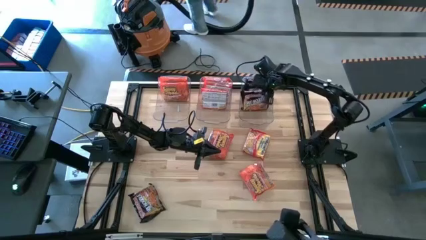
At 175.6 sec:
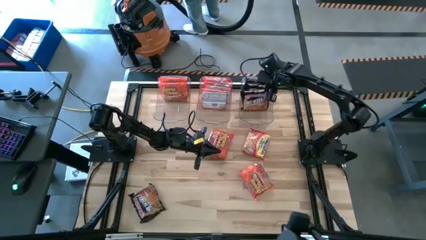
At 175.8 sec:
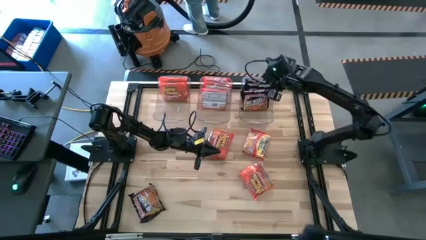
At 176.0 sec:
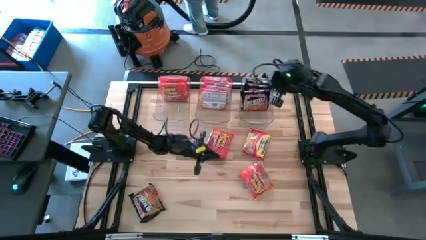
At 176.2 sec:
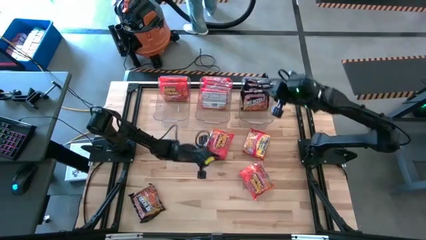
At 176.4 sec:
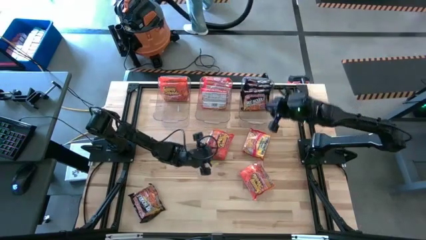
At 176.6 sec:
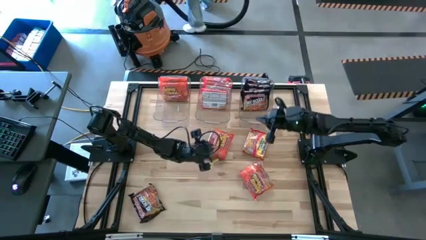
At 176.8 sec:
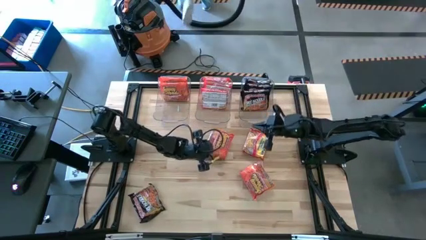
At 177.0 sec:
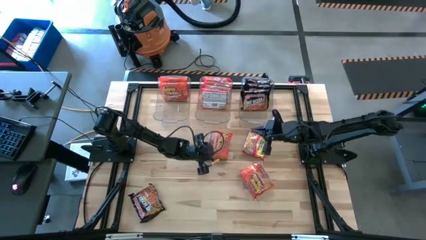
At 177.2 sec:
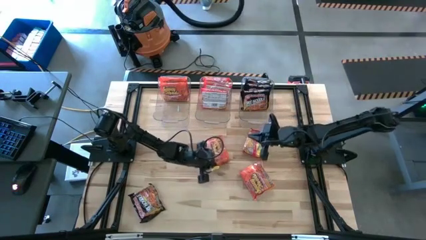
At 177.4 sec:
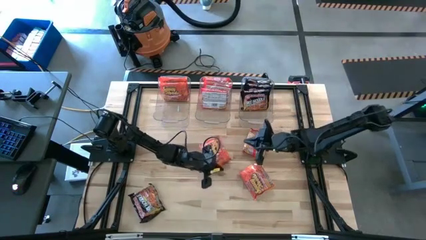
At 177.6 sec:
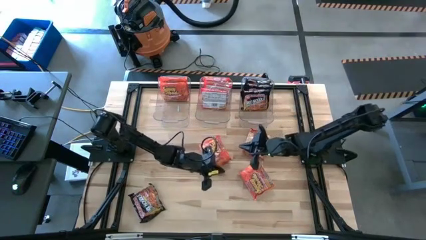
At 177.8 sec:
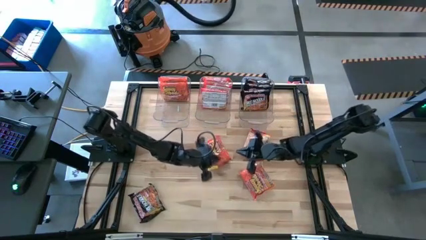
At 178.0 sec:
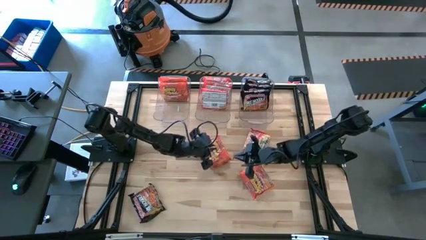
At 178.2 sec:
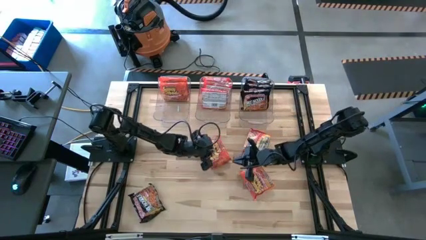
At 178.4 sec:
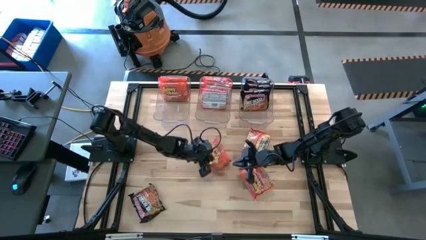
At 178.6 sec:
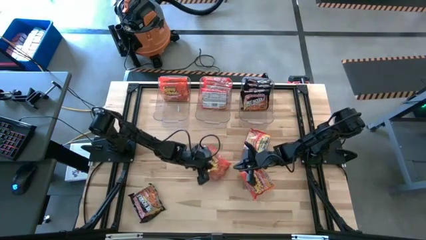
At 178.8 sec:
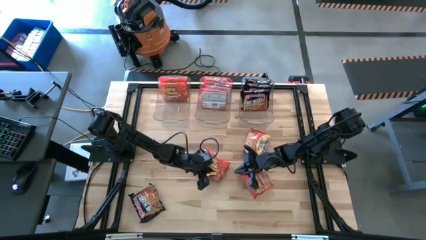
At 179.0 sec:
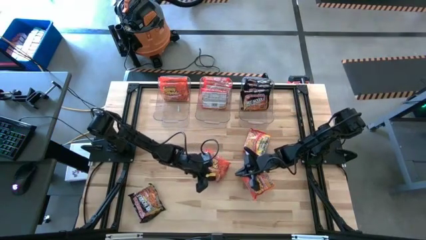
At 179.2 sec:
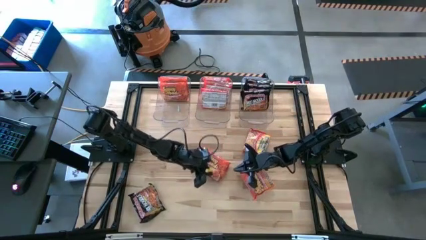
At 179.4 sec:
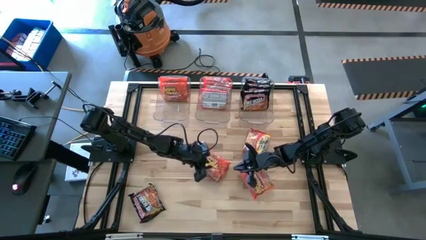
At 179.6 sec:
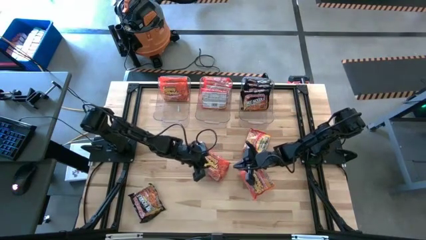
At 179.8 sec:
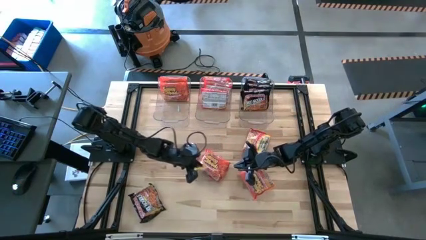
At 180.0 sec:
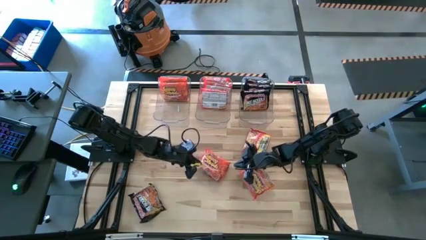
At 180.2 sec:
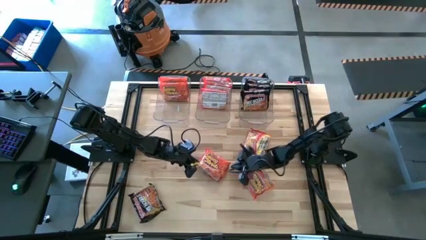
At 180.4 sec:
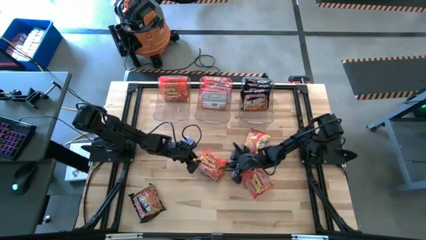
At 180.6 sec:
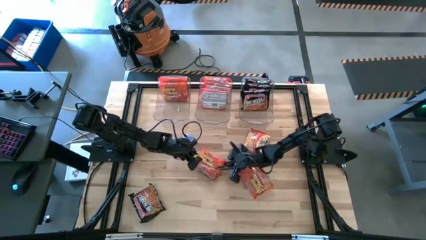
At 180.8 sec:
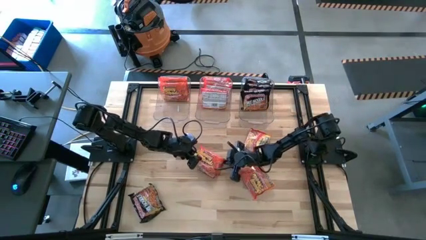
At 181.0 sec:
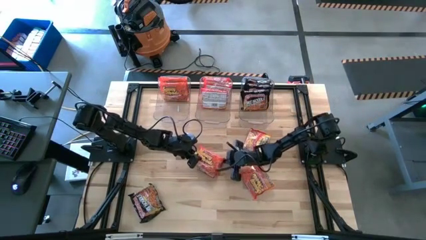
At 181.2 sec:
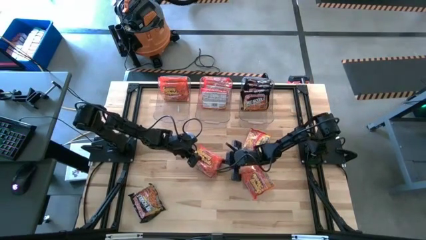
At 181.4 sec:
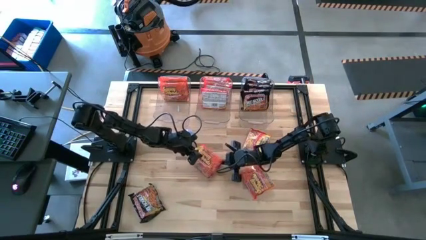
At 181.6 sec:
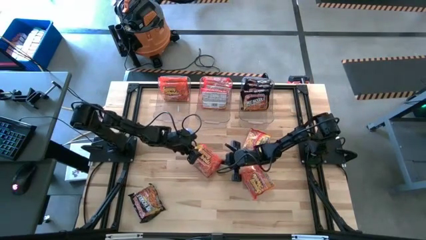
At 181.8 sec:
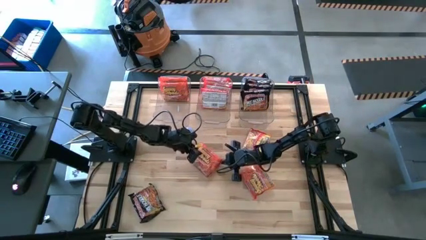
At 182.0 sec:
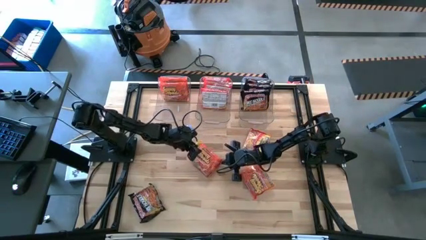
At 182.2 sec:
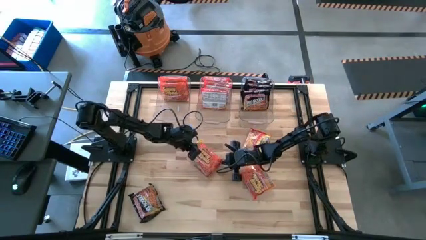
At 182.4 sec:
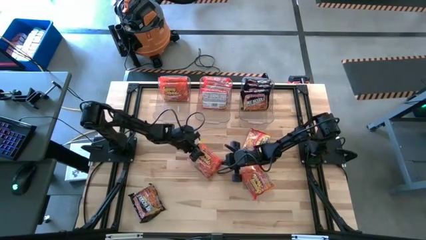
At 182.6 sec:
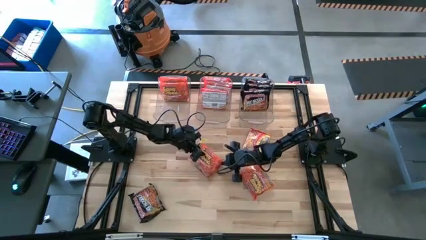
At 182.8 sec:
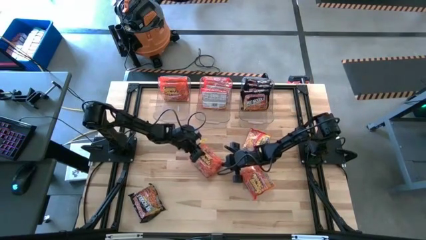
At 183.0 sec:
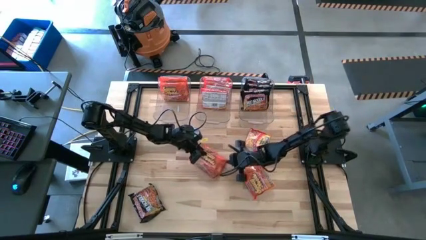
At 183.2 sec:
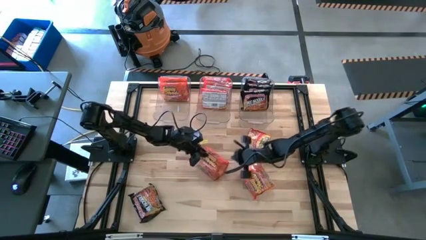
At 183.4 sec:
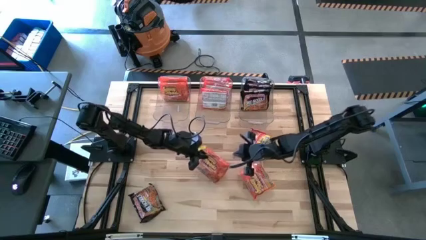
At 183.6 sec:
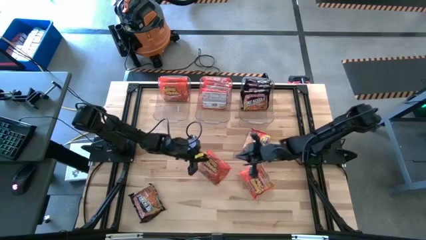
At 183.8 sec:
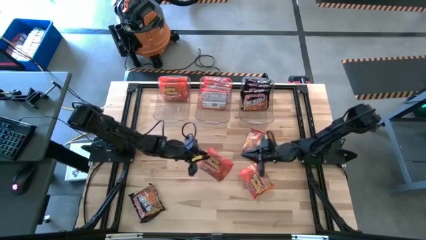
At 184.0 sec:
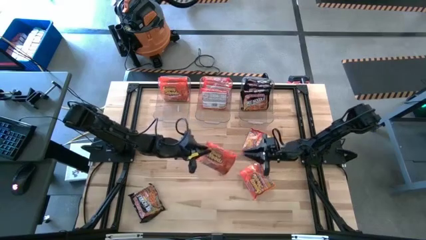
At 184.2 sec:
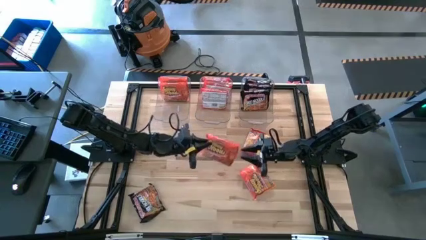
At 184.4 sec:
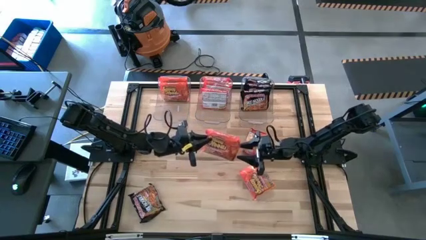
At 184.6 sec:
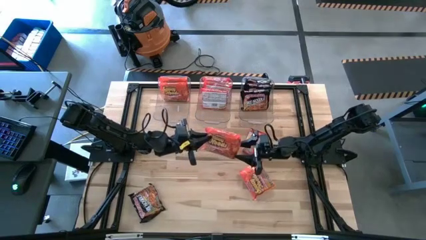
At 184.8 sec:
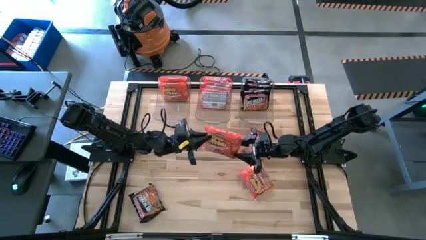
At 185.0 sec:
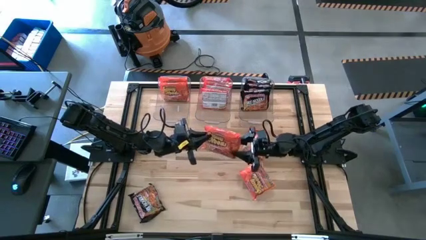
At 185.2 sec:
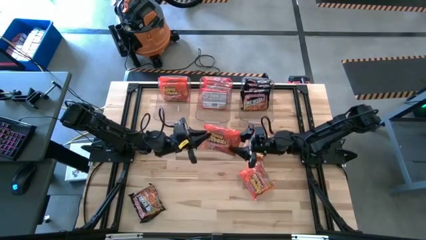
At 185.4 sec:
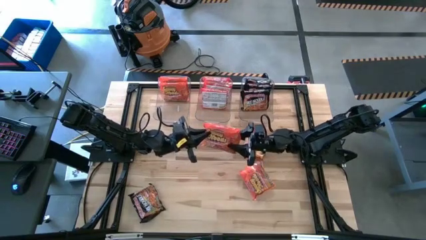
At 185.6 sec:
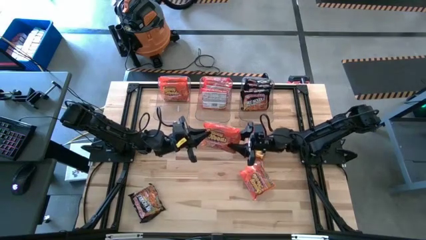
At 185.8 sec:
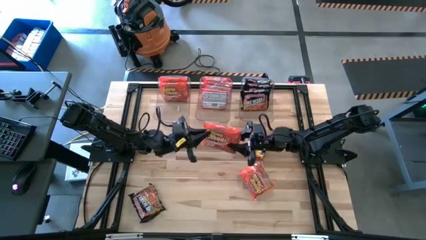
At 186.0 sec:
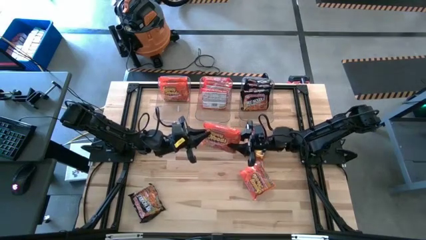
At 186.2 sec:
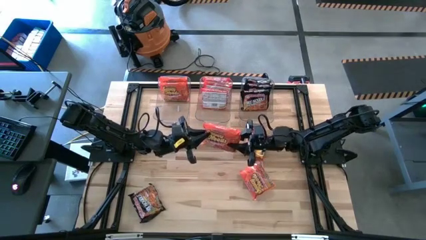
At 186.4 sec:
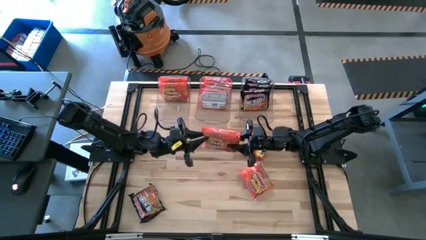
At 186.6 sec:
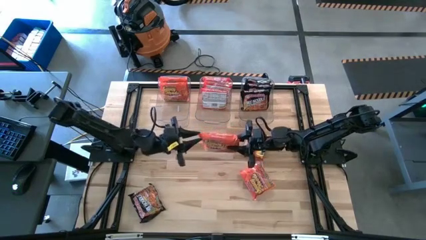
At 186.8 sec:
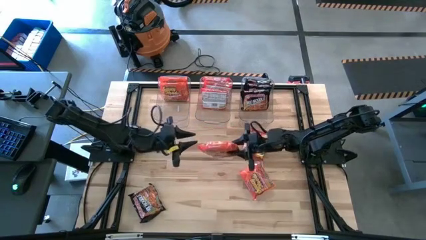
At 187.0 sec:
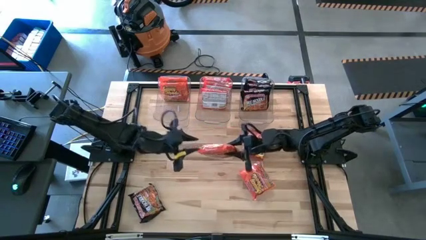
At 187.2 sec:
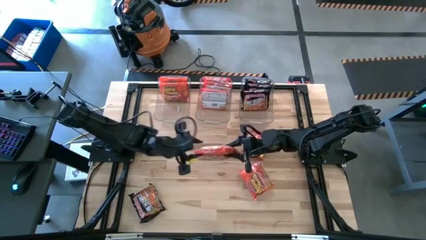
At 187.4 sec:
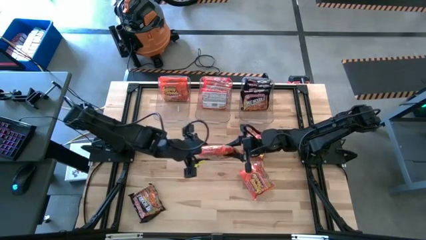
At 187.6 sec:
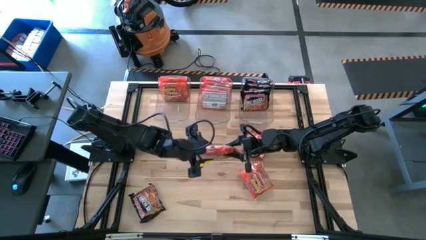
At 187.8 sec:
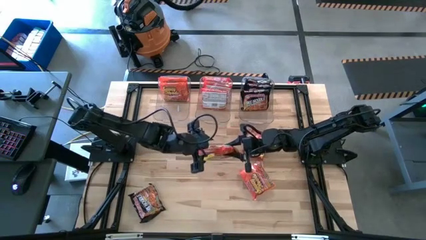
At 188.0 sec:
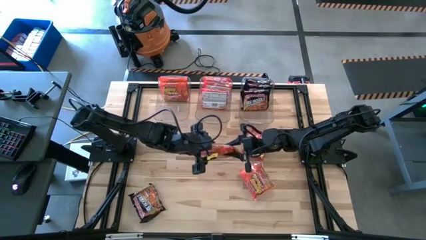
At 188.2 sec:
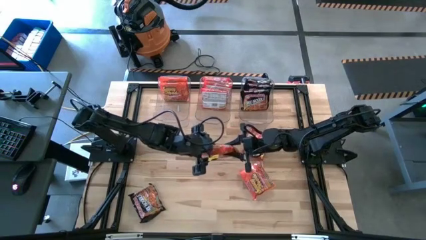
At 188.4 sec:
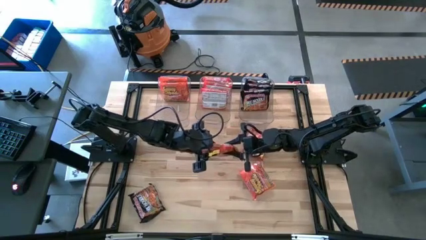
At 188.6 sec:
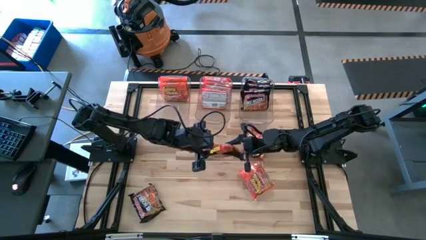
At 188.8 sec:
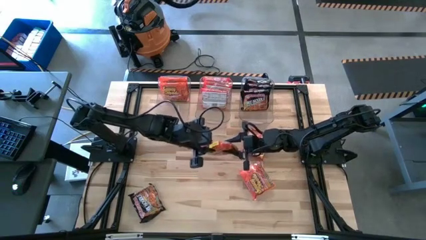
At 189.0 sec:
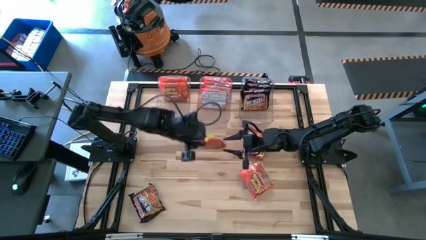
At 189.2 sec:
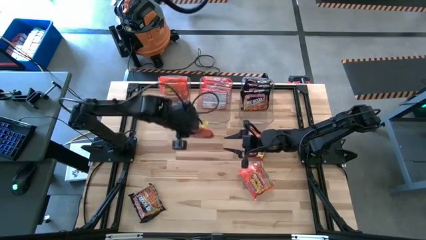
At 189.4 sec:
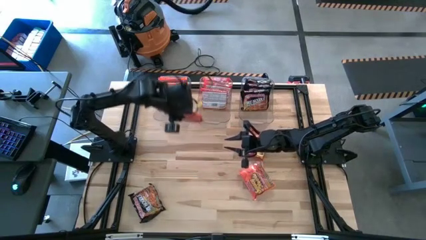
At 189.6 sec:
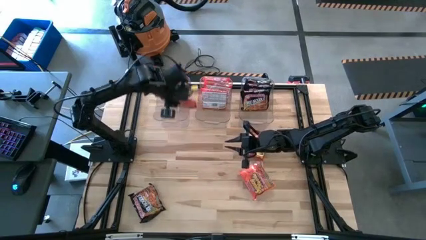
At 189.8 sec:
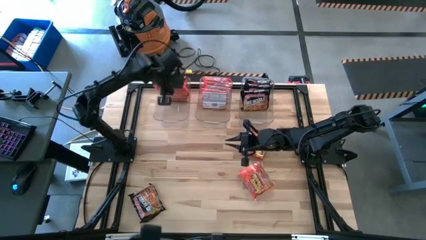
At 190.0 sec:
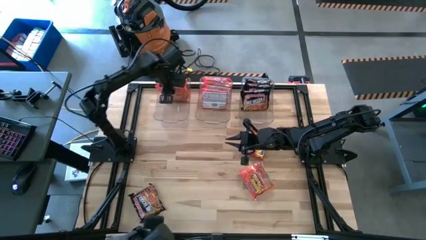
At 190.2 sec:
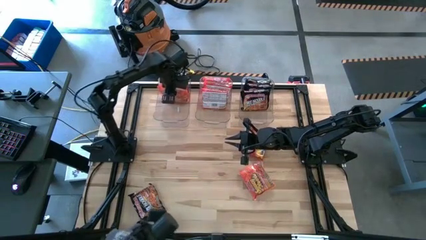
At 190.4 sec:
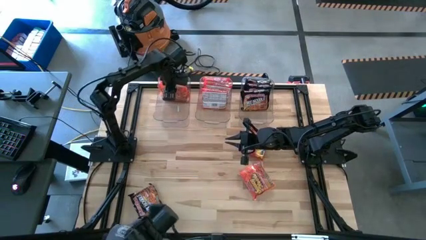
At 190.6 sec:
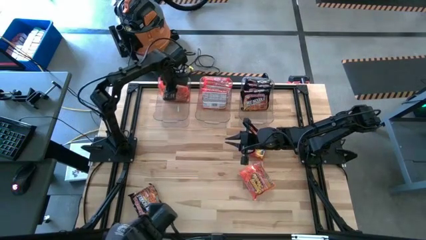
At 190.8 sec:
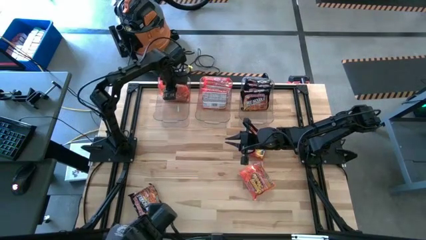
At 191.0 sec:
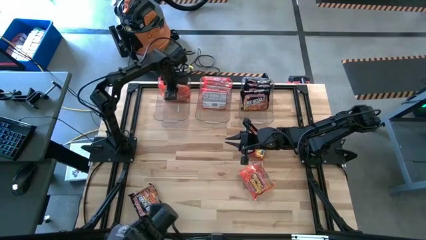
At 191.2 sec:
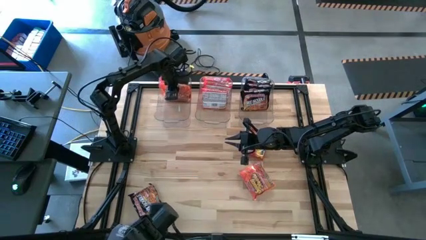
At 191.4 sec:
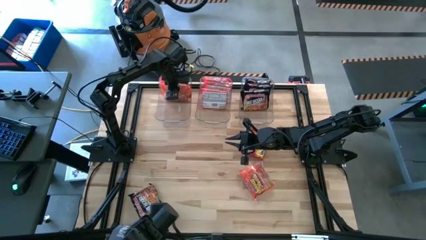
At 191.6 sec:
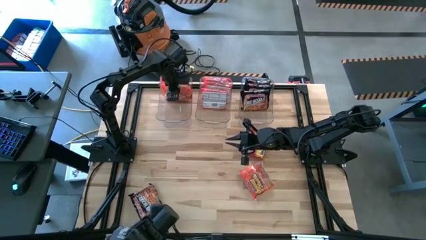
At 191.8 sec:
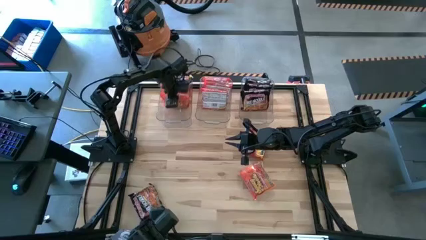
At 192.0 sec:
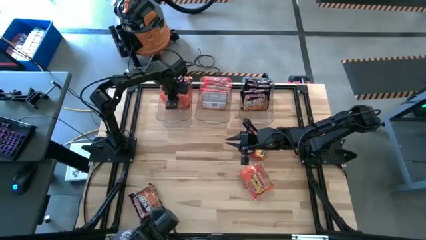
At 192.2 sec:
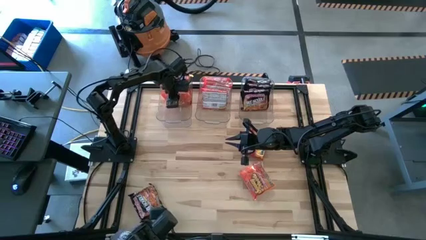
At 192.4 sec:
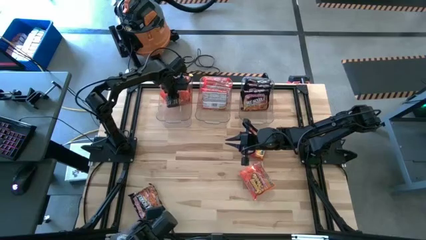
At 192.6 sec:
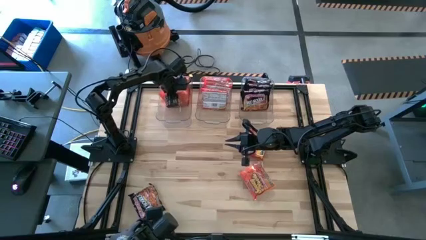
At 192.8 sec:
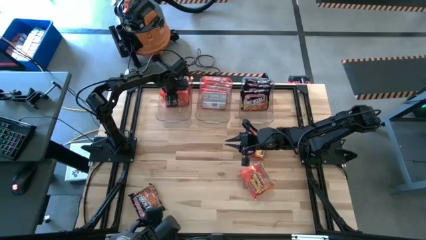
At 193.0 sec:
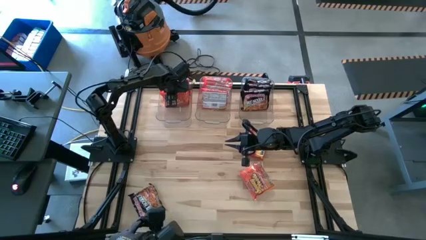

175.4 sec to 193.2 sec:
Task: Sort Maruchan noodles
Put the orange noodle pack into the left transparent bin
